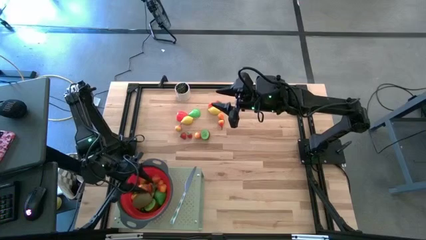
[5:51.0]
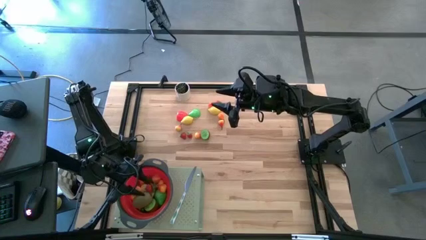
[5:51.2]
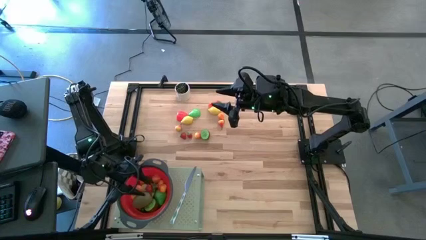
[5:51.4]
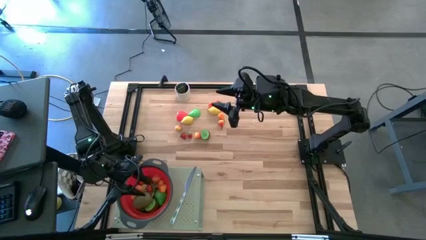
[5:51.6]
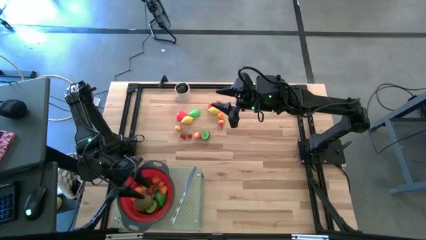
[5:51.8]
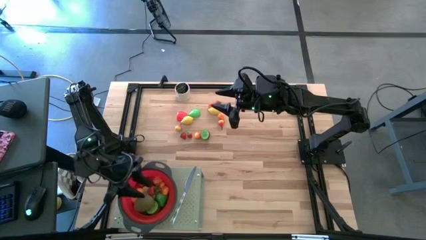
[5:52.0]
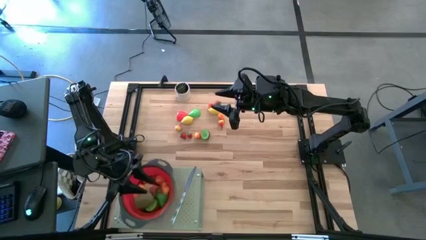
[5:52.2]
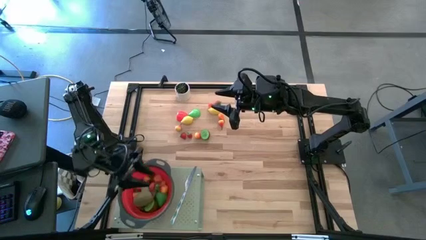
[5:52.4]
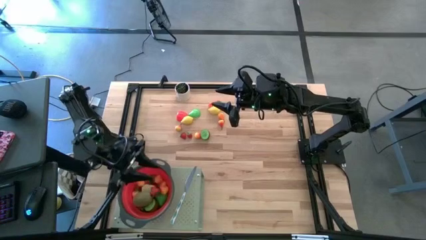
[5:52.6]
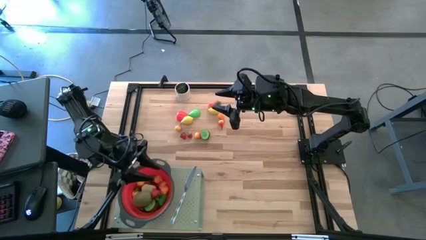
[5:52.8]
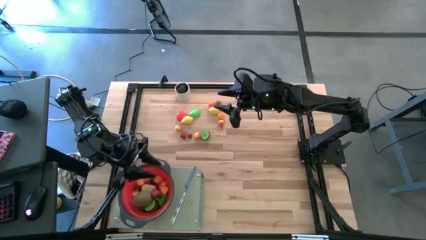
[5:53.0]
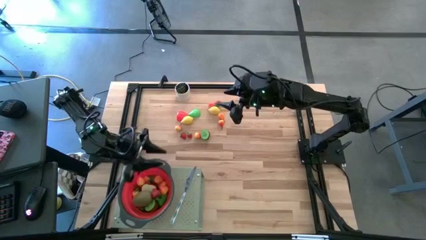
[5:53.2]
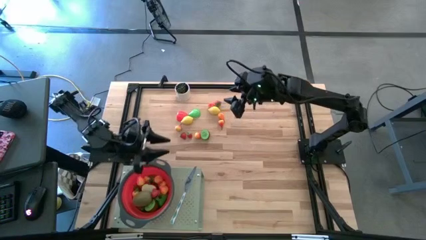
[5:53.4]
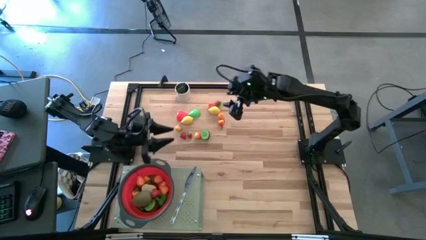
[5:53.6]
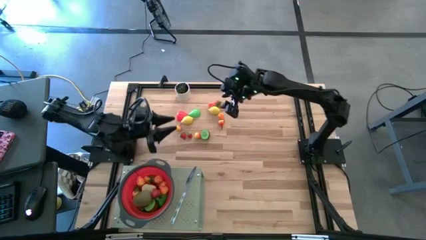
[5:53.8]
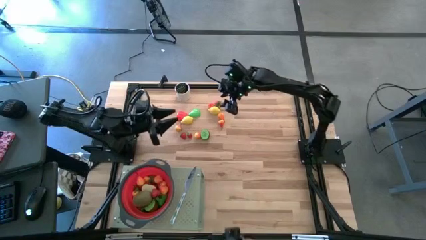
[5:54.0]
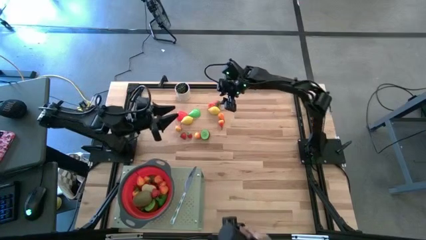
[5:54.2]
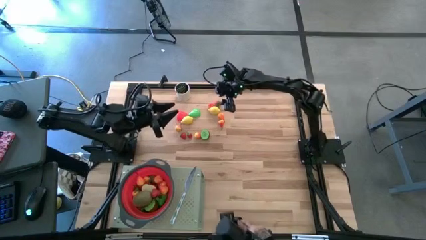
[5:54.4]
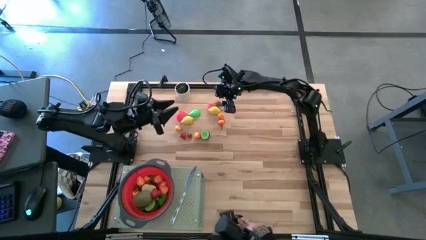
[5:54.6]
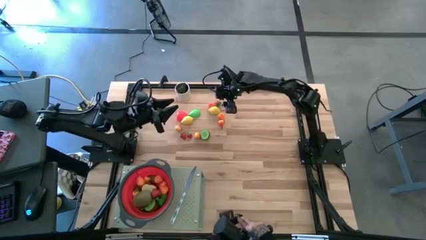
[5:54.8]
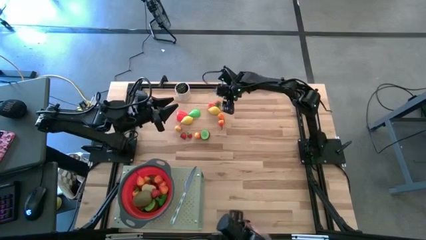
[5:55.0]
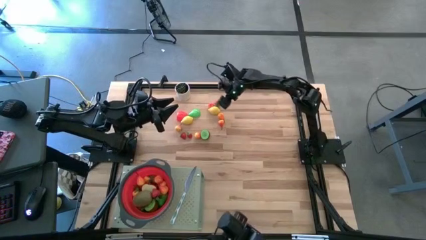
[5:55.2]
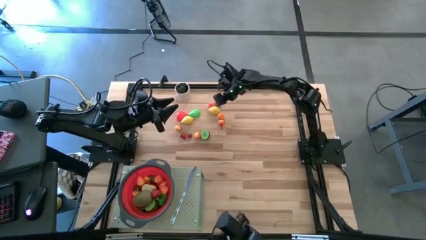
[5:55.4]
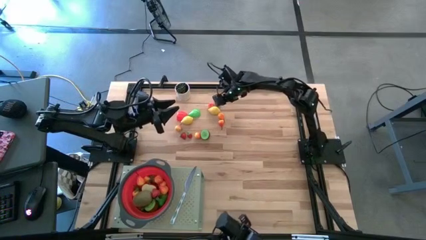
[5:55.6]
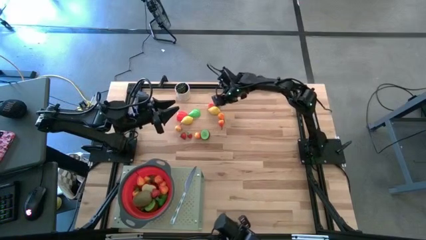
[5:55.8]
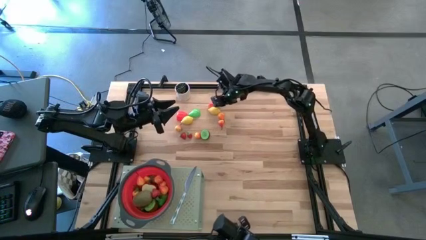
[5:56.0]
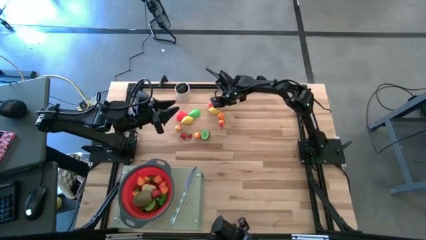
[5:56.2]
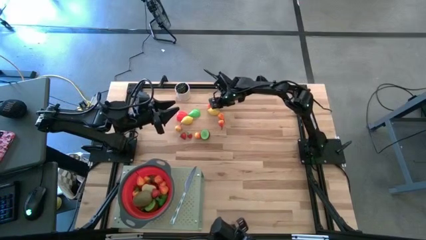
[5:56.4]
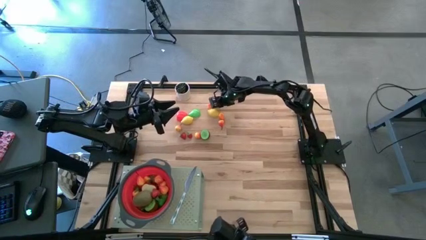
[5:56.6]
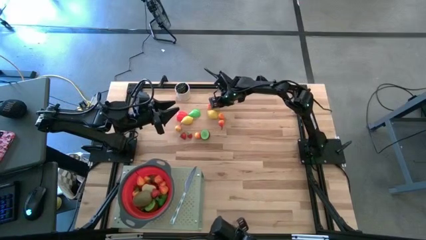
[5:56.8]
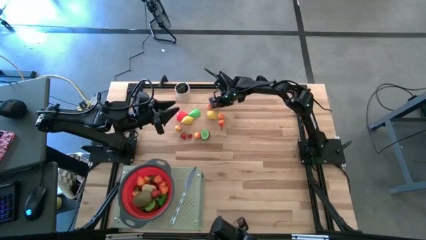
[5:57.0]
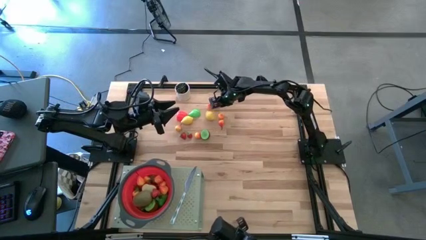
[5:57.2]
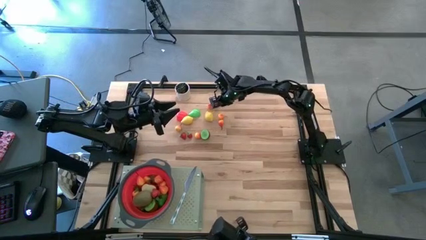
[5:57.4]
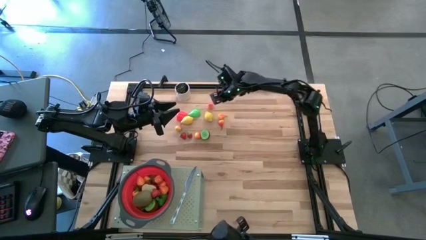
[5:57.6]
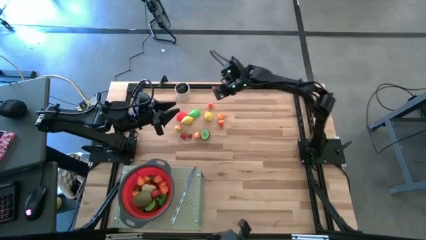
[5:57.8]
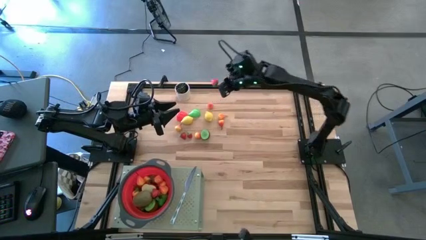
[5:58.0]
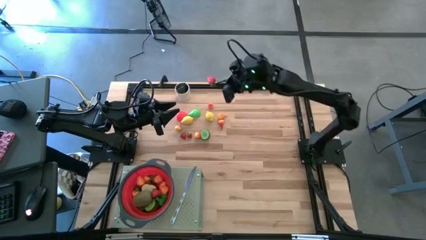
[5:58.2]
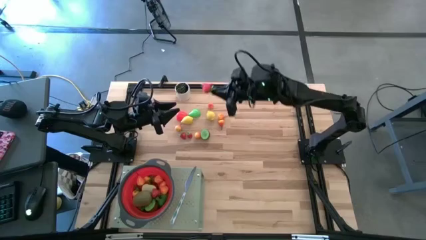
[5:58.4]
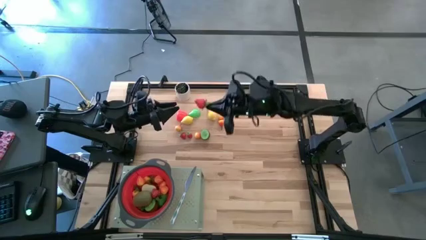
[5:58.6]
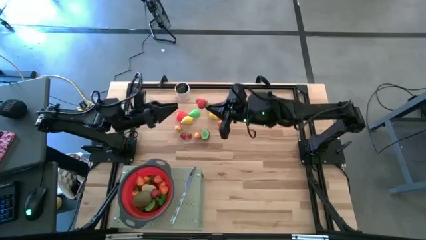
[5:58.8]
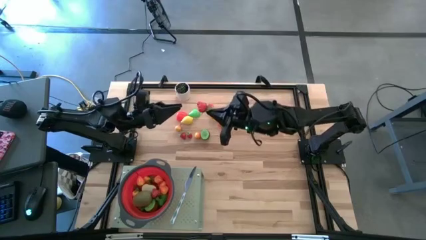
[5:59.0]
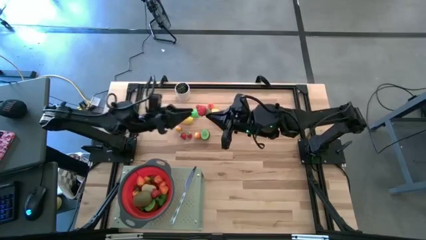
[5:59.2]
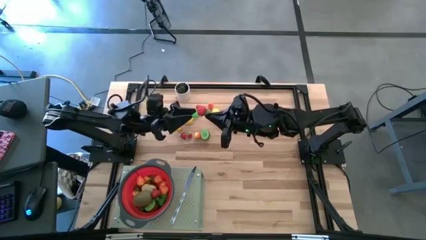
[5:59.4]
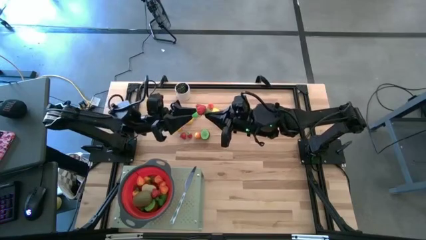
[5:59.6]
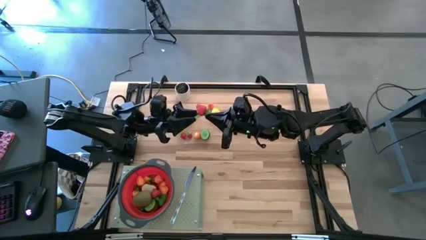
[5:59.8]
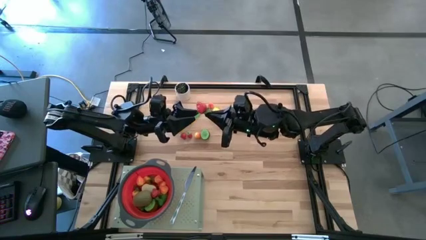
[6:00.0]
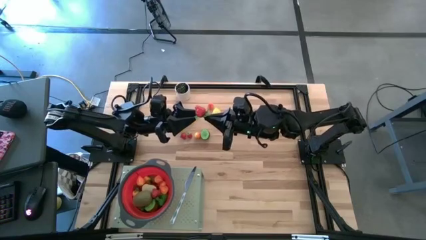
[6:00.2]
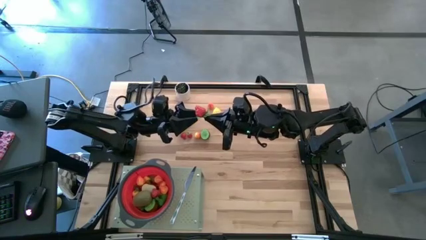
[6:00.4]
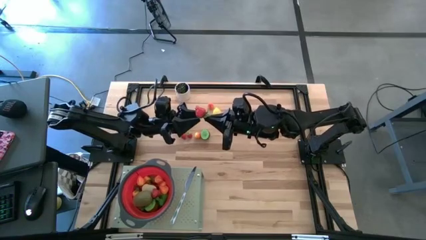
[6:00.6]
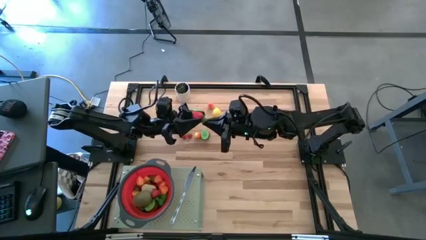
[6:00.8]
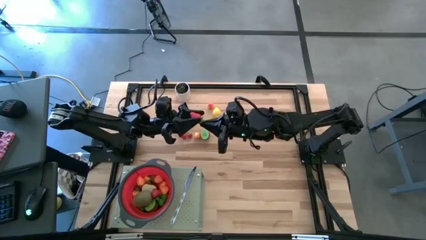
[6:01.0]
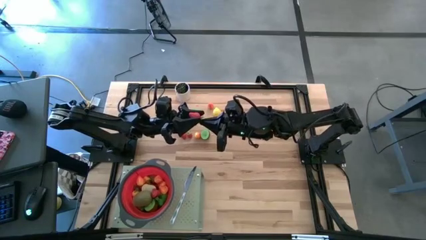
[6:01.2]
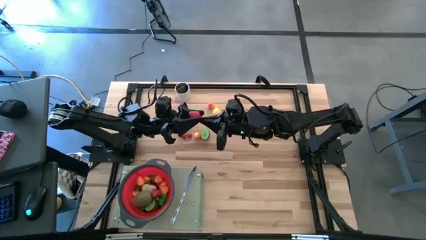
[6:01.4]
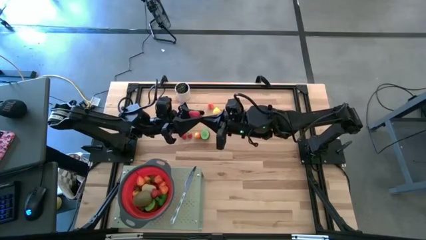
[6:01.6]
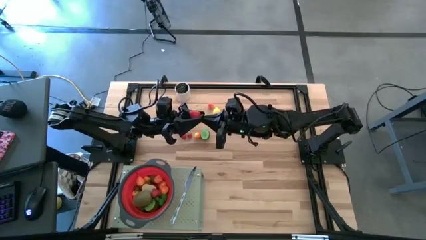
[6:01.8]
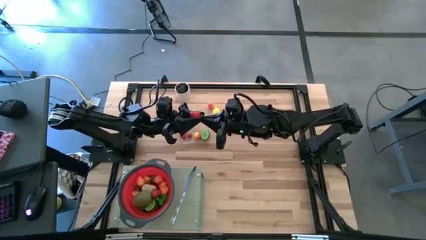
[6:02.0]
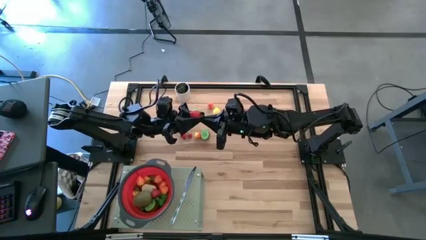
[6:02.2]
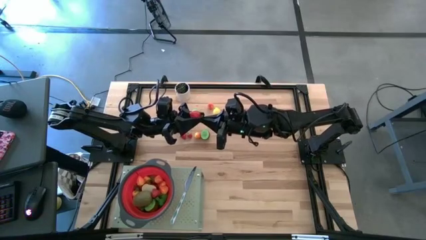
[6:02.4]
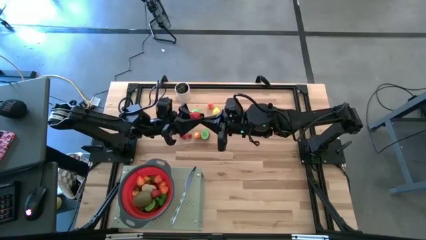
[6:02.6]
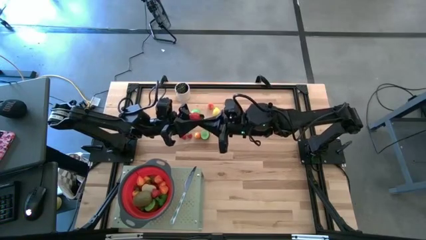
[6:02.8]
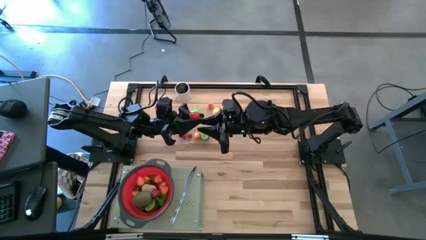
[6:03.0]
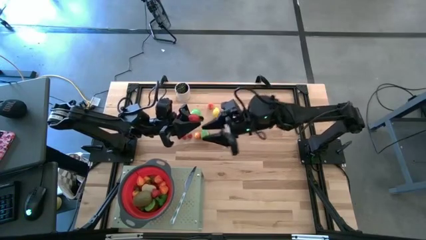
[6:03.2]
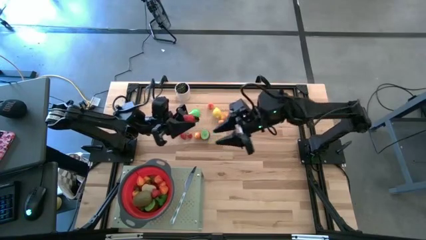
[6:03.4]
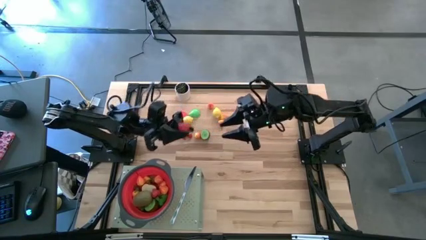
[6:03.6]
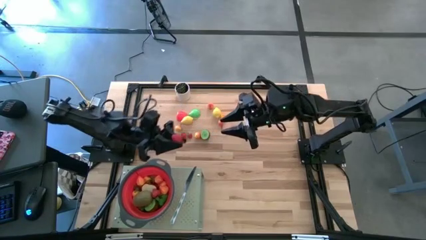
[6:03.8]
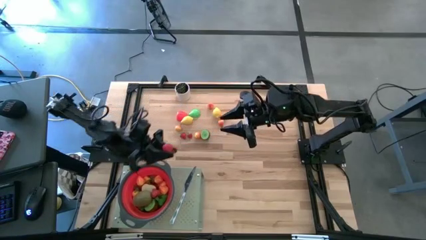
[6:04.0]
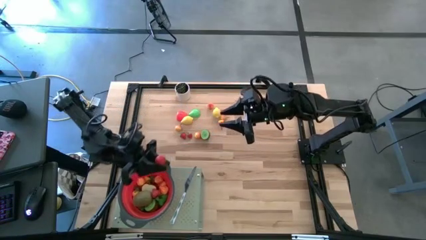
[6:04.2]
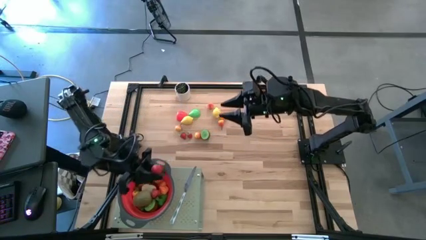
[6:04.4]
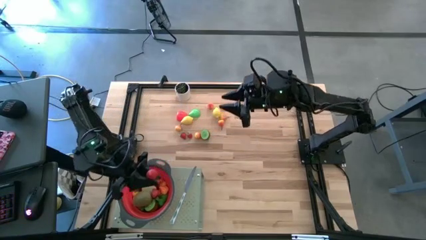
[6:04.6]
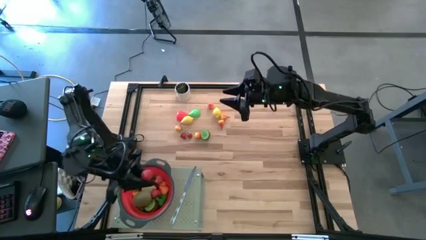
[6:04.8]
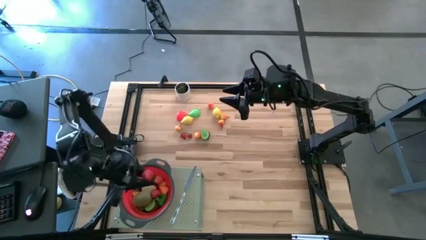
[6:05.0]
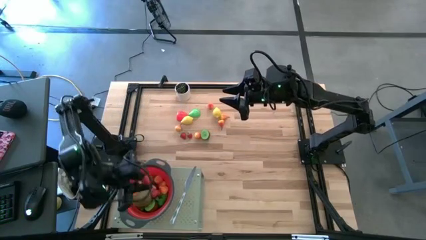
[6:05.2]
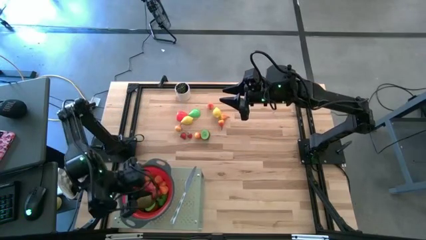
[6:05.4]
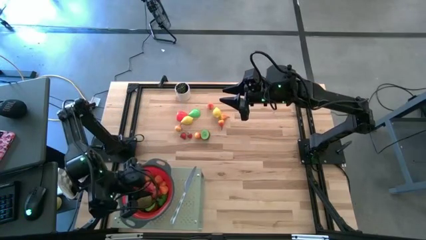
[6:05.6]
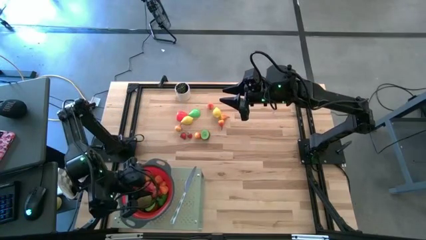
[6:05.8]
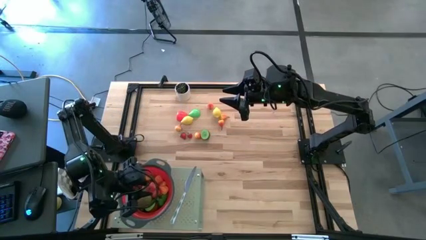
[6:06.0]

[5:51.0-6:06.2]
Task: Pick & Place Fruit
Put the strawberry into the red strainer bowl on the shelf

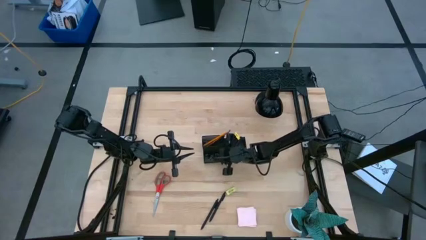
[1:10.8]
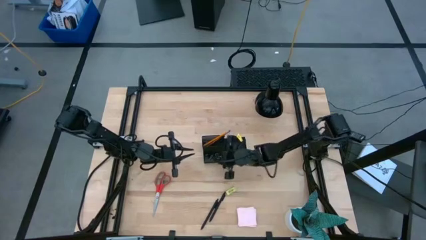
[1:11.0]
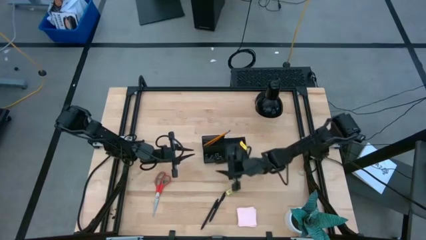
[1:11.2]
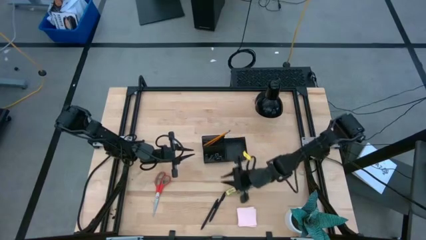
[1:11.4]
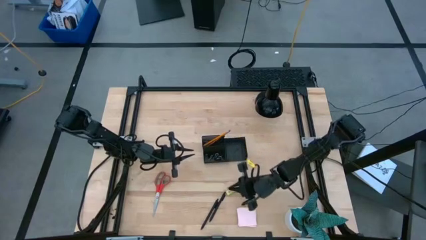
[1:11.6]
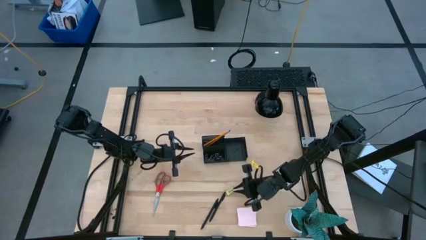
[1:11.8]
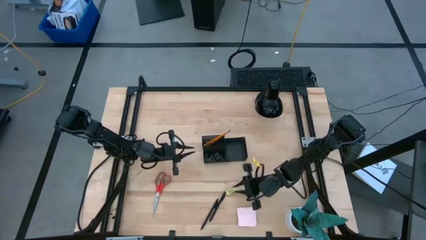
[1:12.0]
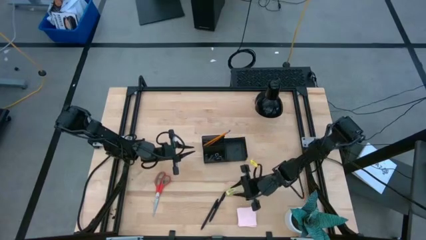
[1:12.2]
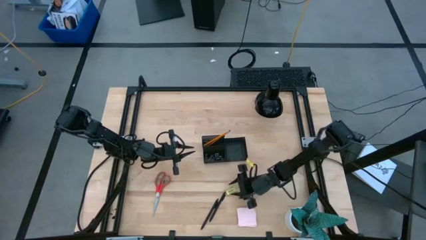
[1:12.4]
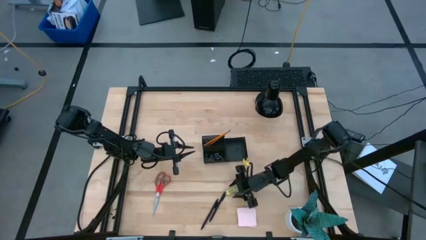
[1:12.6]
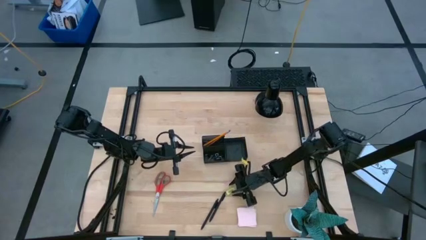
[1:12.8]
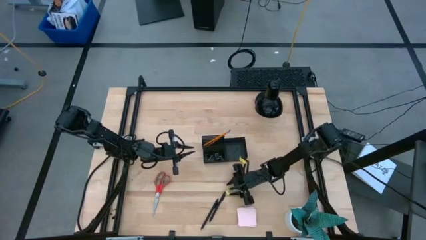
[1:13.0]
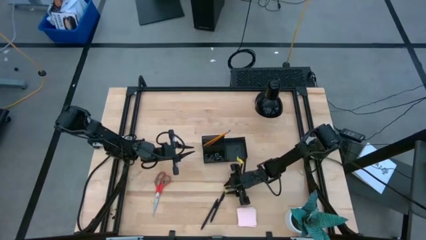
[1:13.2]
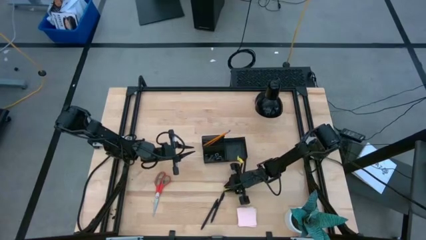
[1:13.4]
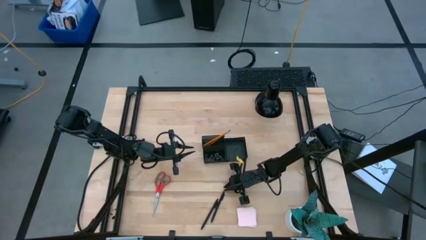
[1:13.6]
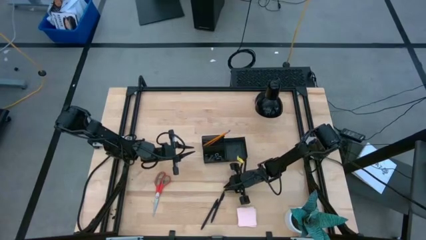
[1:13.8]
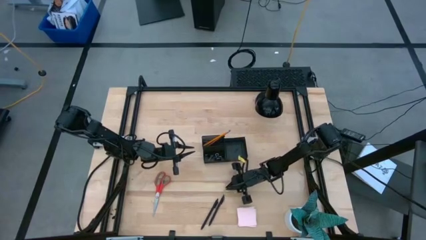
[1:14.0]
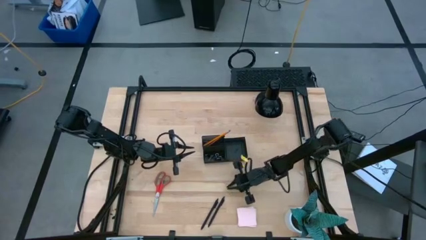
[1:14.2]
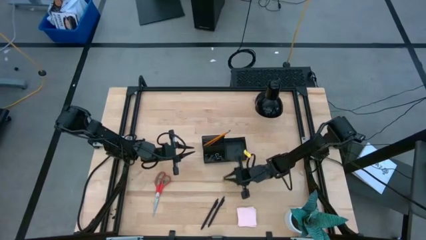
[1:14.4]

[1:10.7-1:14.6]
Task: Pick and place office supplies into organizer
Put the light green eraser into the black desk organizer
